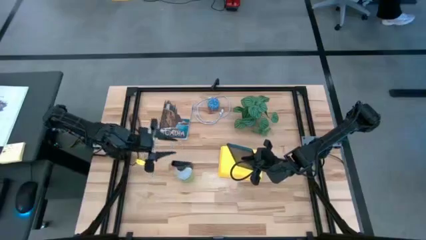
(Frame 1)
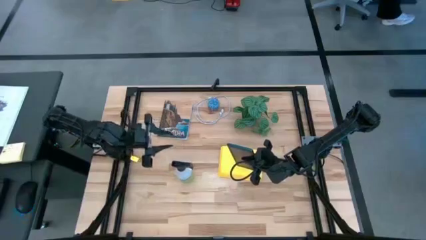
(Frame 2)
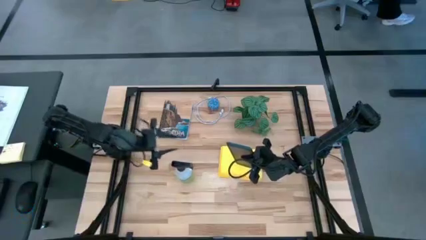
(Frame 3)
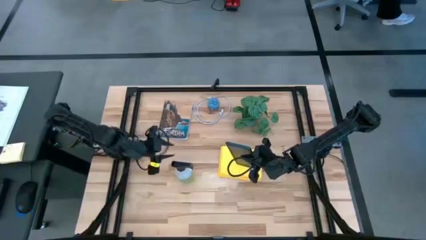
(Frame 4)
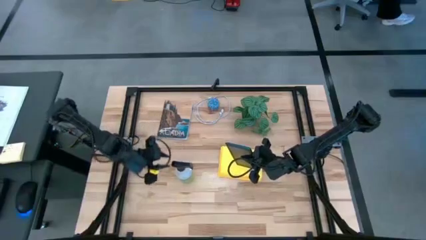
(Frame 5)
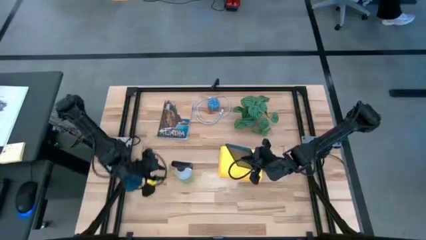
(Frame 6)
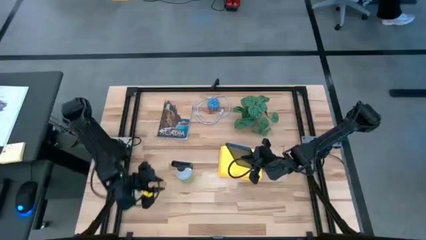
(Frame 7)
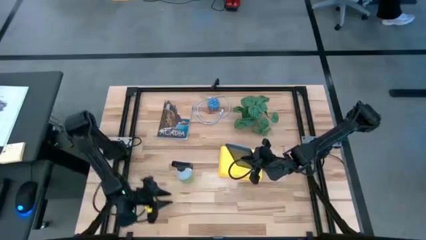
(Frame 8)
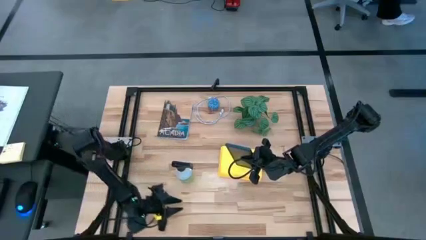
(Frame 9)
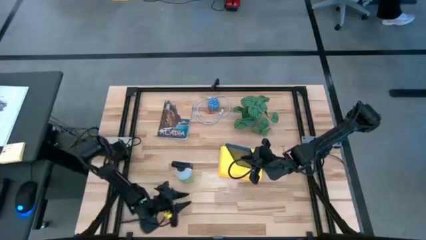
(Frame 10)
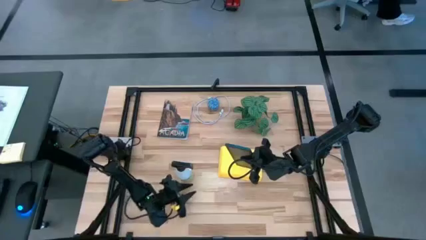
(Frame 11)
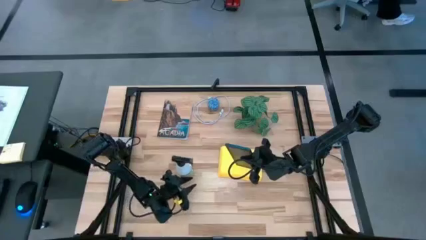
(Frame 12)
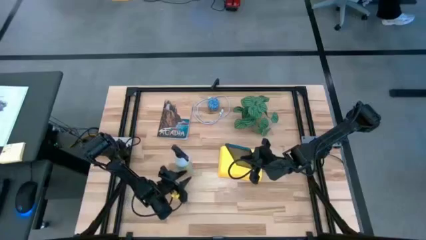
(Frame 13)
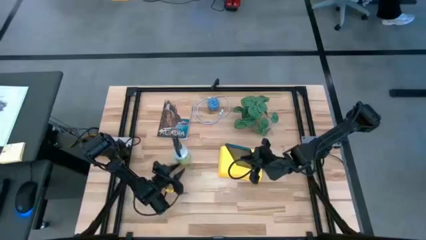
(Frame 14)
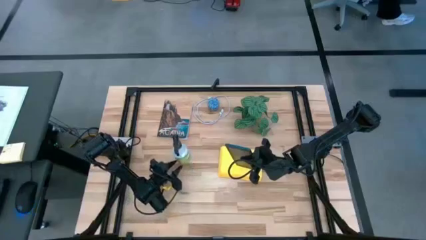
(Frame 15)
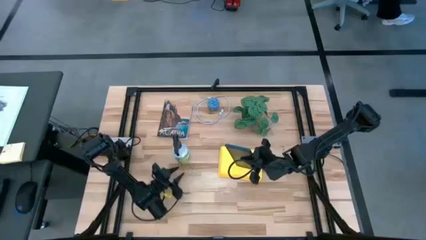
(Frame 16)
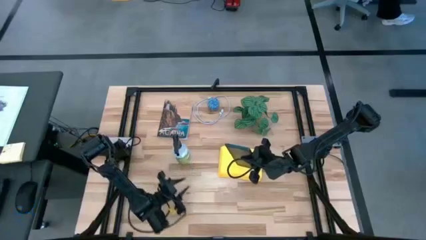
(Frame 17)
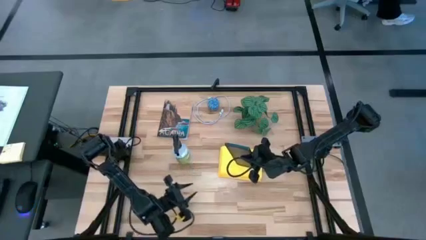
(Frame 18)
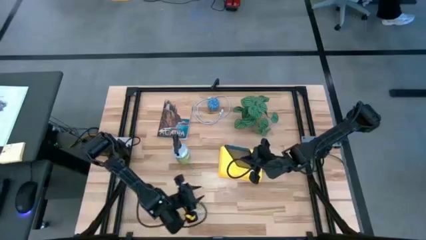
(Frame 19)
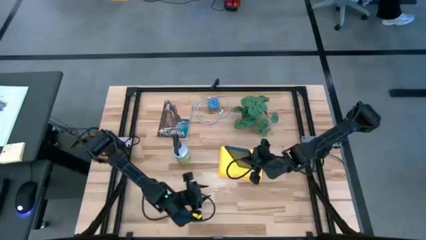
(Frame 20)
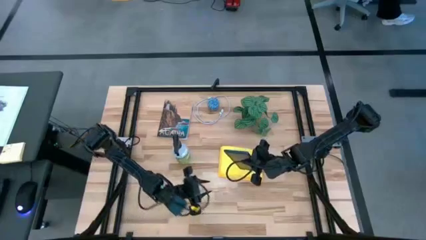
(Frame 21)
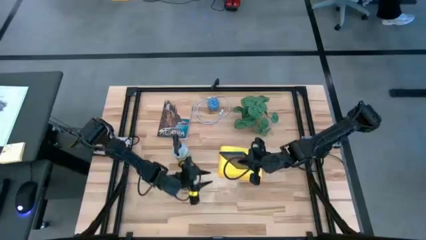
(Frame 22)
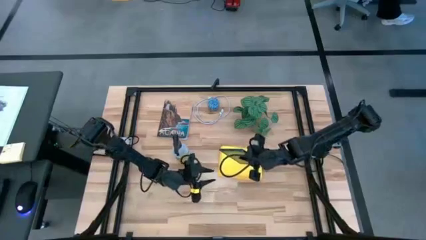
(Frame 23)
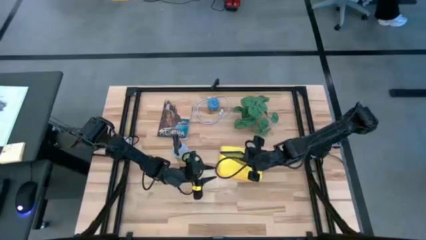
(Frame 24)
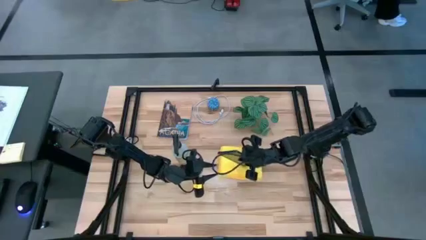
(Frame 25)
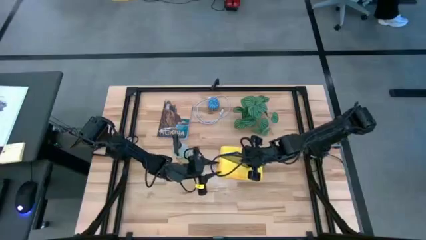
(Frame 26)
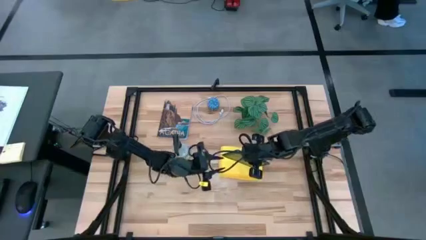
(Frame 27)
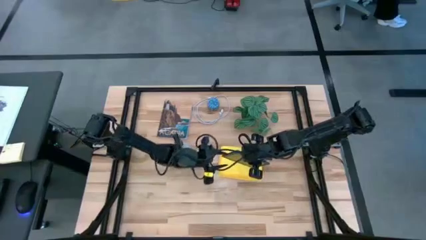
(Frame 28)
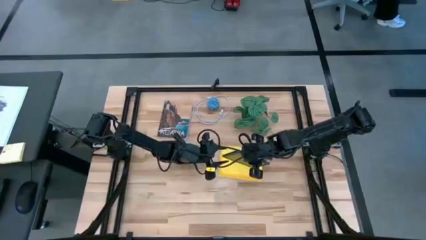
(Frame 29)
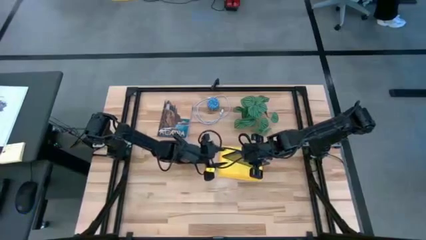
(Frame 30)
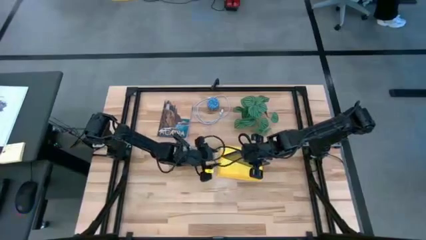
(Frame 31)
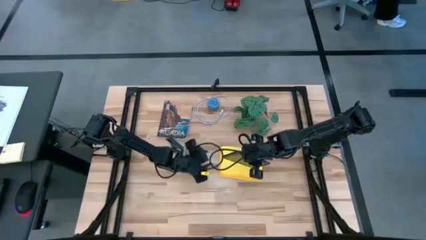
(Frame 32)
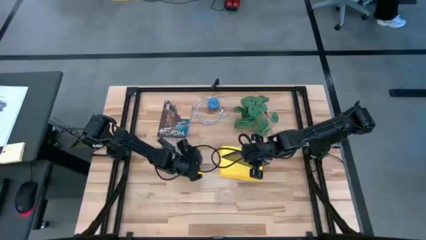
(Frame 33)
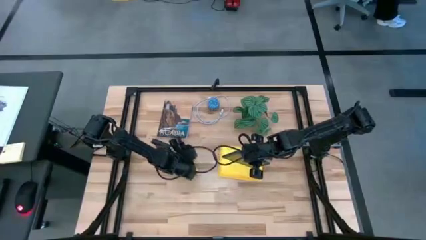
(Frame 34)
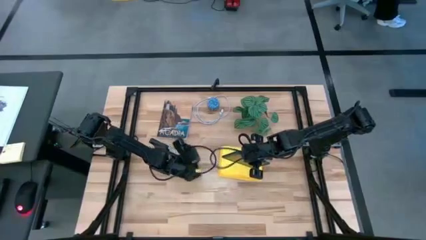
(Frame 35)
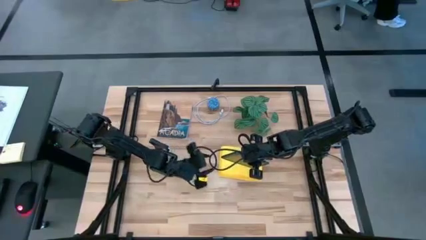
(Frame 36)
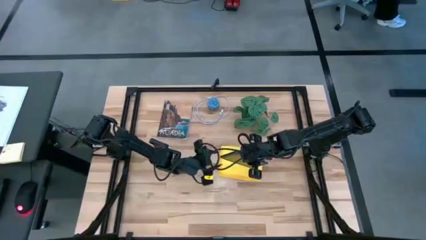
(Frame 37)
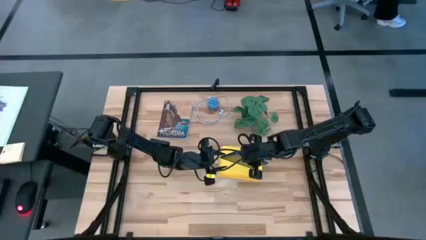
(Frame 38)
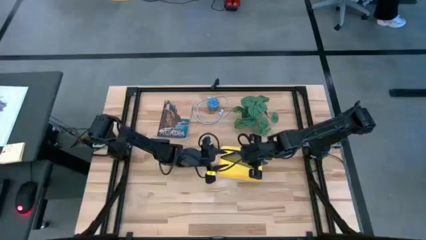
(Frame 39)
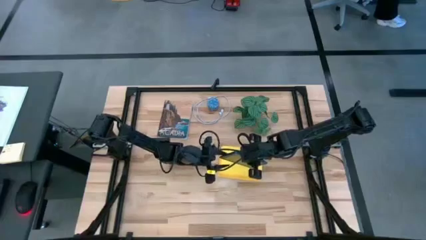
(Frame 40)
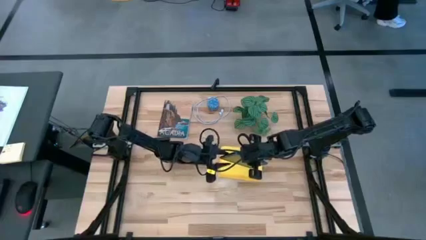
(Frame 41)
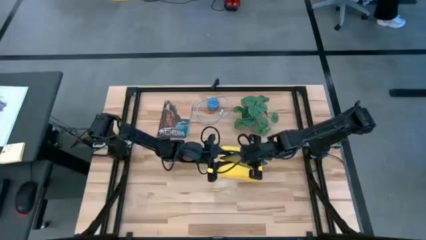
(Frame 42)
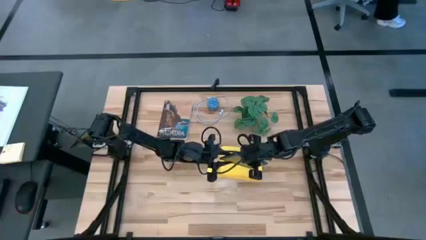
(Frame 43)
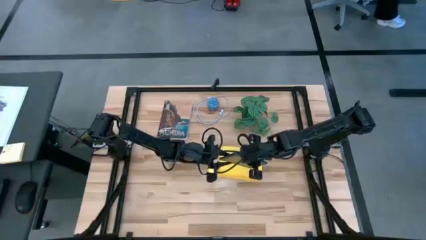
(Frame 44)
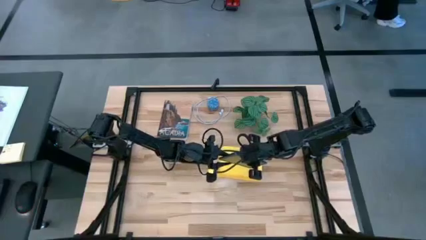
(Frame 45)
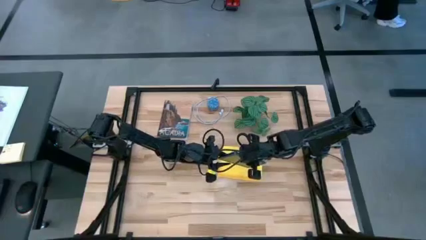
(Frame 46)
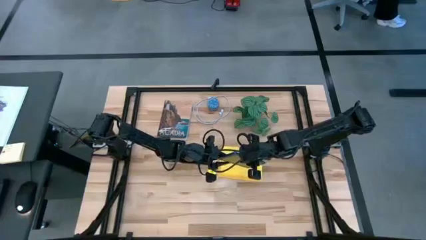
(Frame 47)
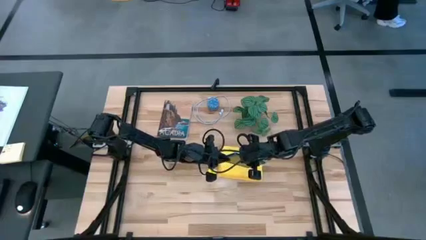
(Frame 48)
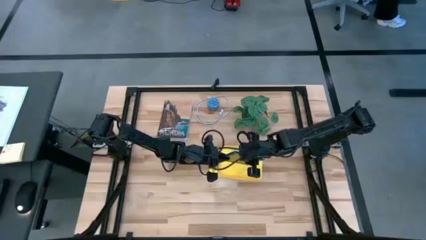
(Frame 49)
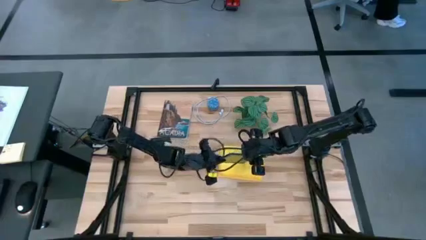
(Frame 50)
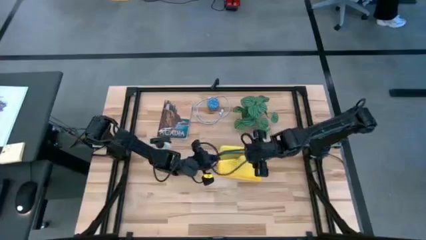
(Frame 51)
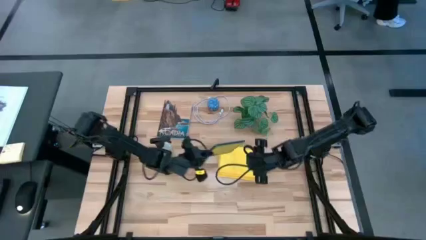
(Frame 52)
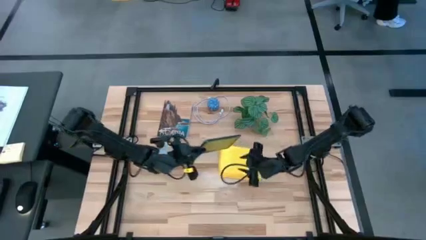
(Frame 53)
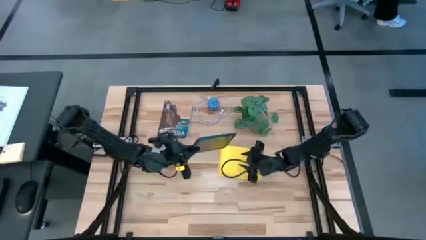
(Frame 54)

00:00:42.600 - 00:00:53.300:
Task: Apply microfiber cloth
Wipe the blue tablet with the microfiber cloth
